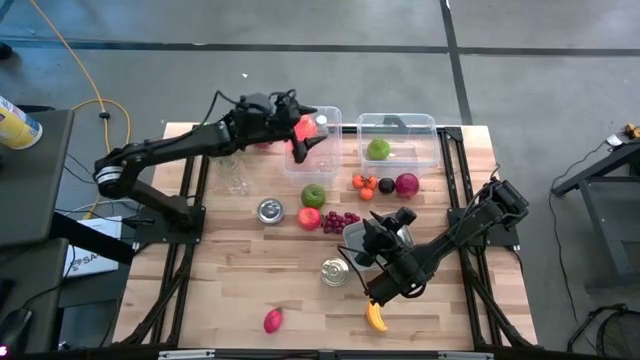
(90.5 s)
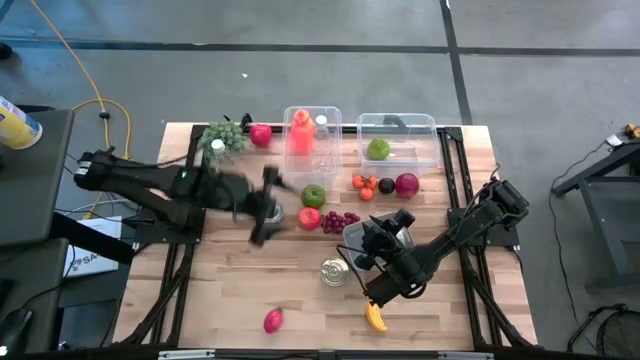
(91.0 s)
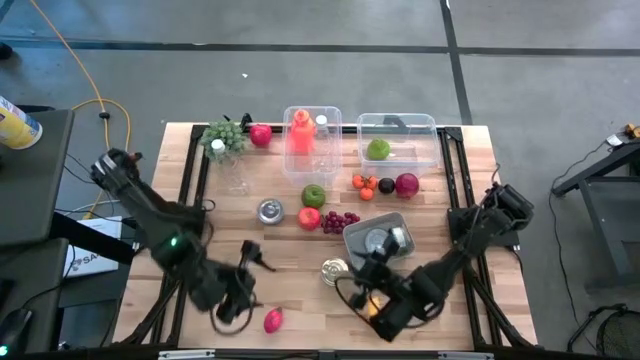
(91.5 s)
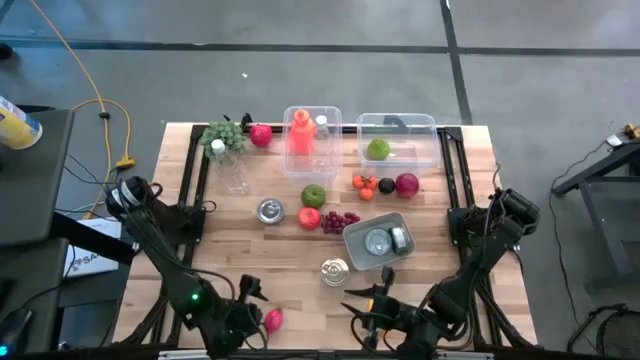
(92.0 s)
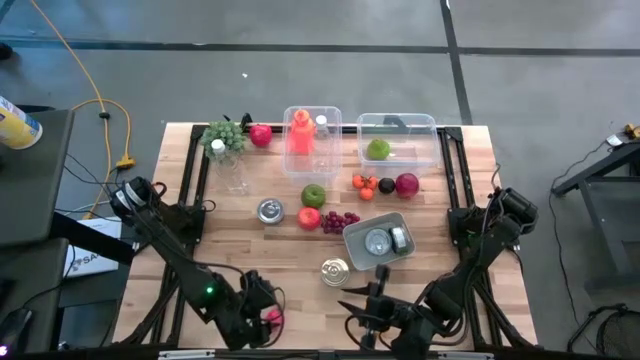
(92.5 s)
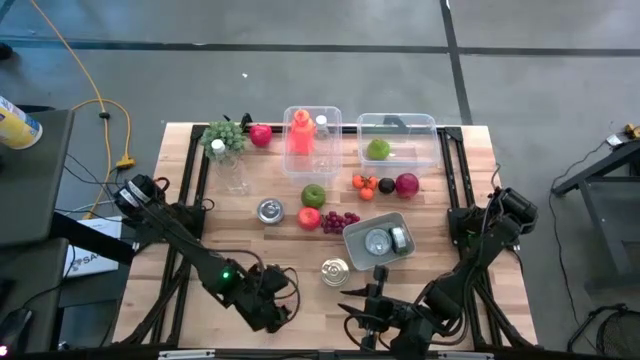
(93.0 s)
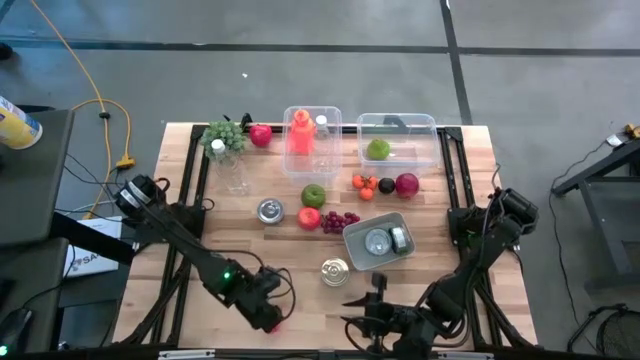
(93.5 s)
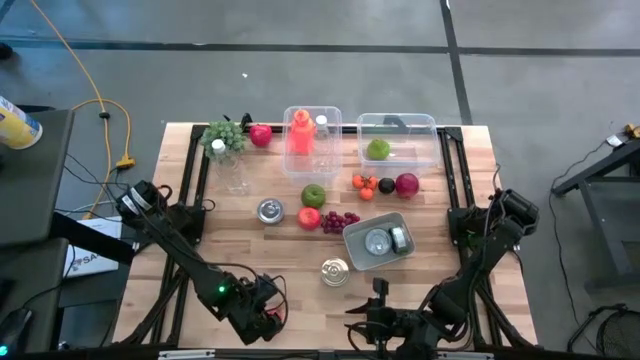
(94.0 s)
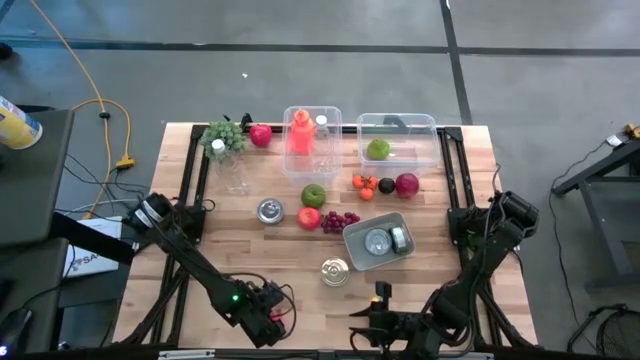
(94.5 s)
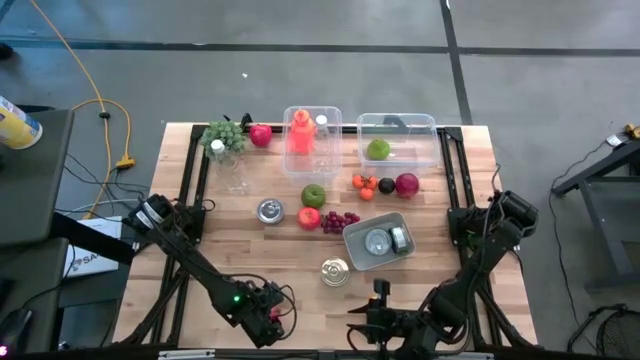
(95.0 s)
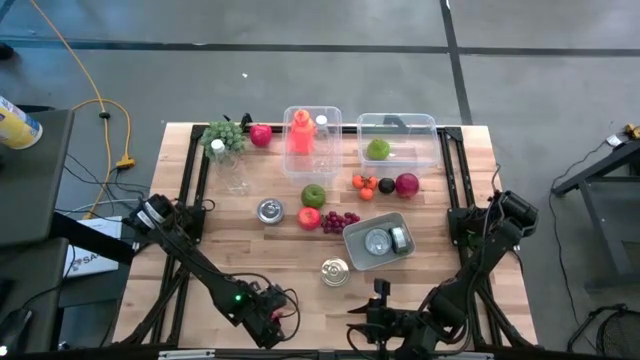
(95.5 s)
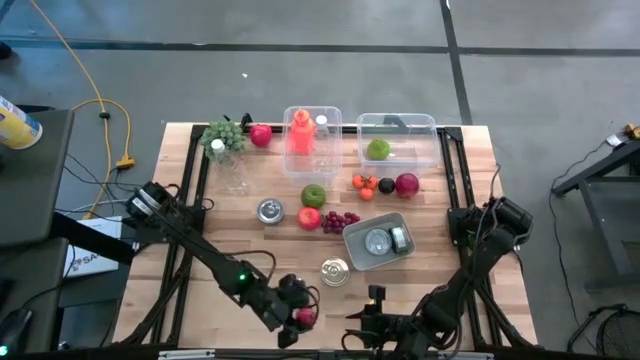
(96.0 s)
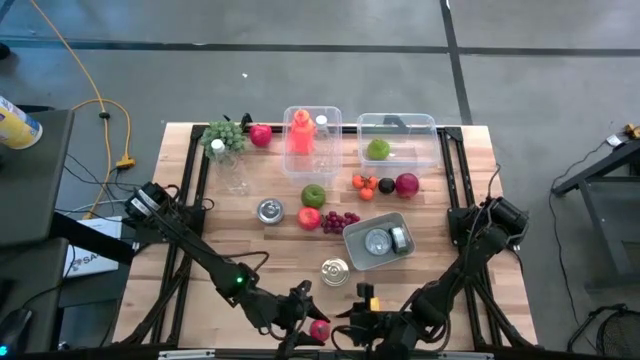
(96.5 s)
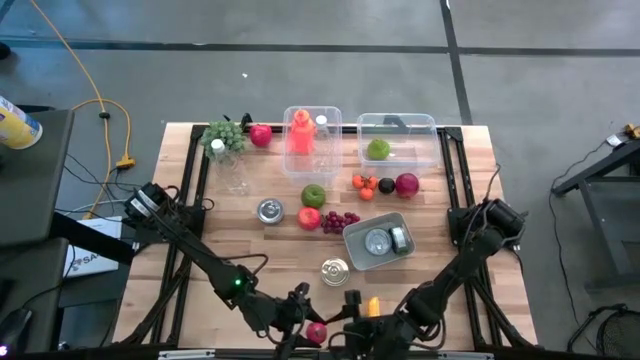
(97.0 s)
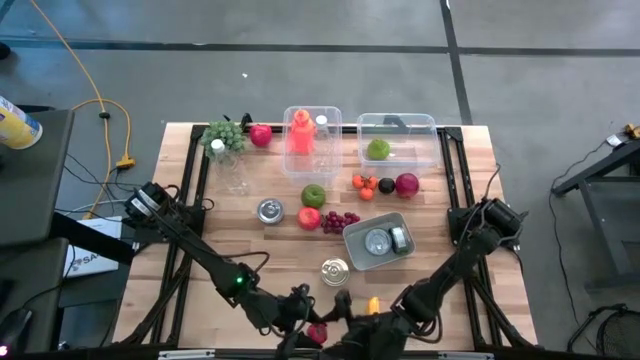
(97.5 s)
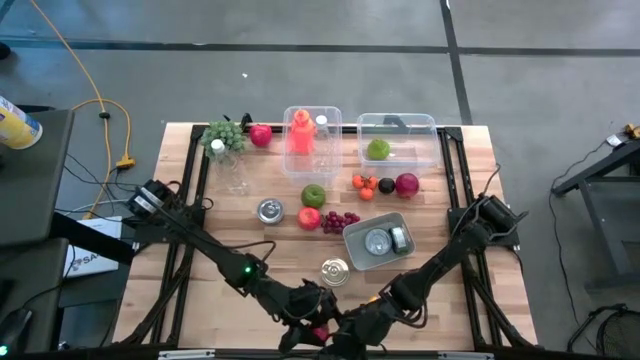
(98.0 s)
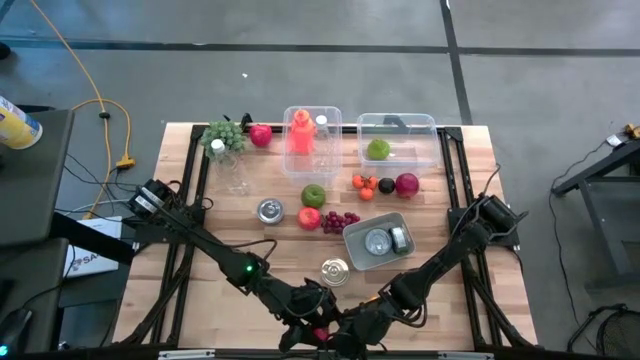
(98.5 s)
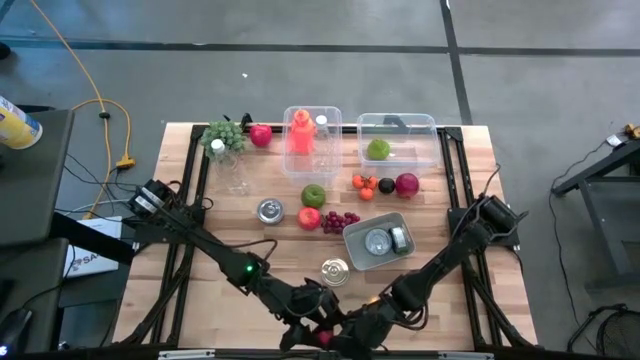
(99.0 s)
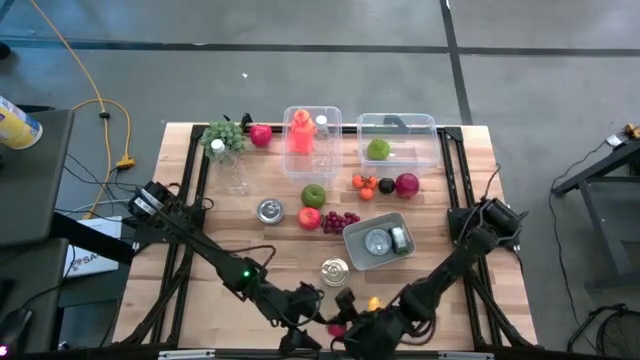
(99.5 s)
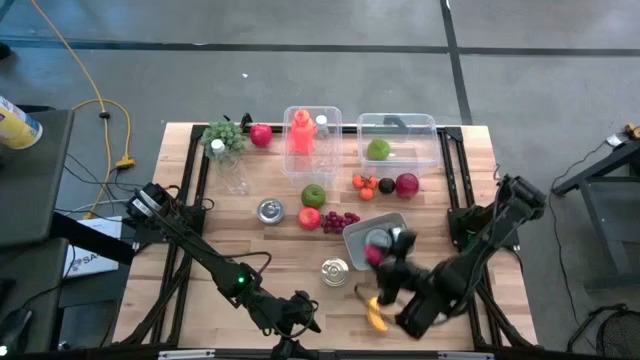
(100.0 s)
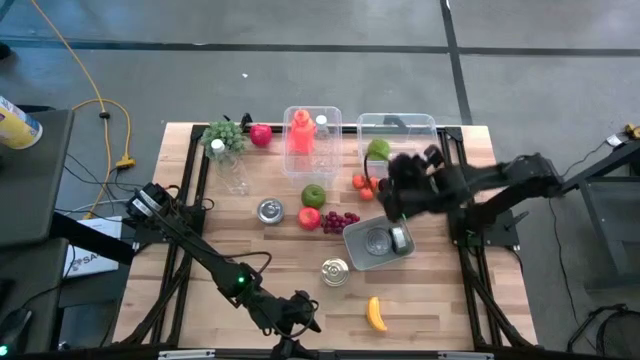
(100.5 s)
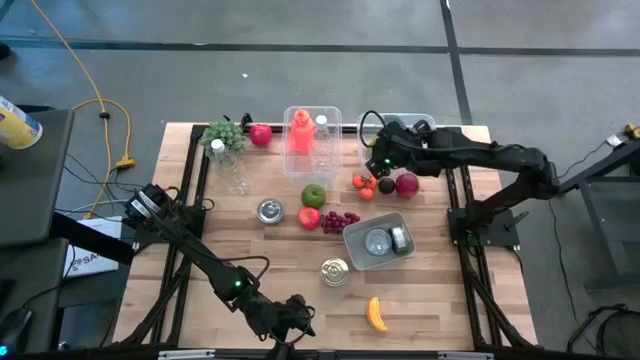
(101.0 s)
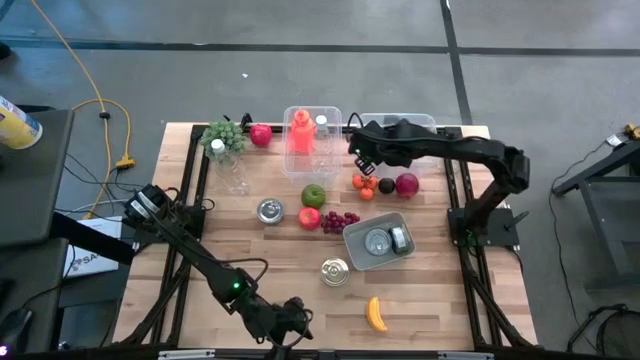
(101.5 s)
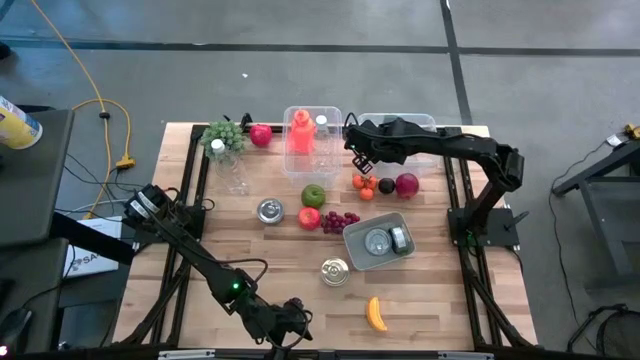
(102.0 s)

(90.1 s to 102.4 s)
Task: Pick & Place Food Item
Put the dragon fruit into the right transparent bin

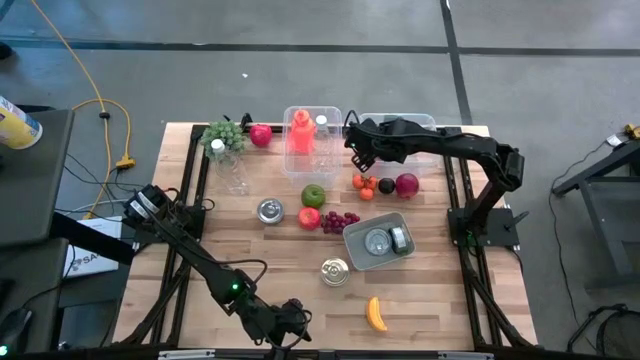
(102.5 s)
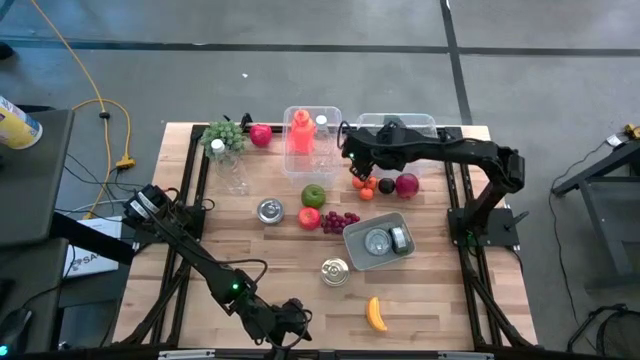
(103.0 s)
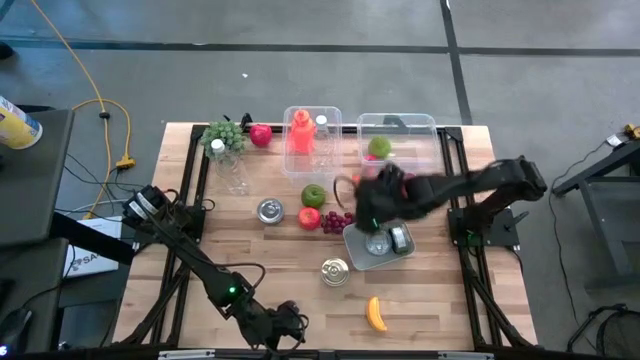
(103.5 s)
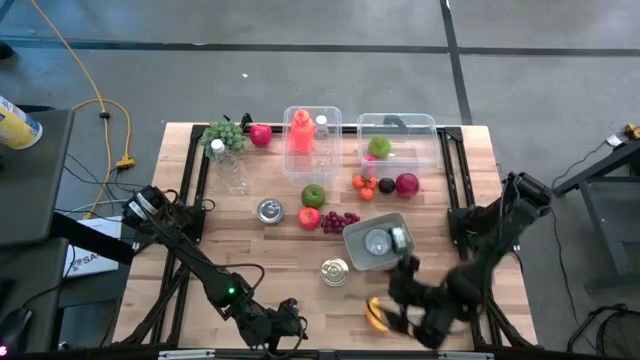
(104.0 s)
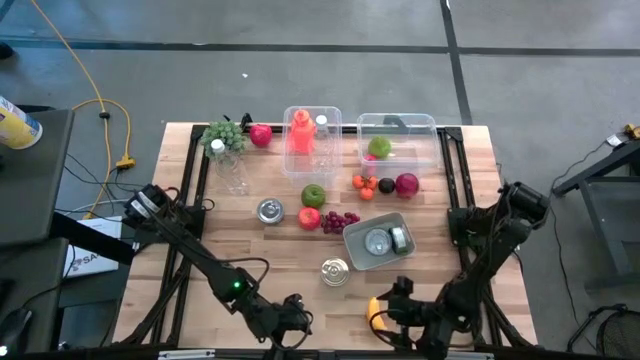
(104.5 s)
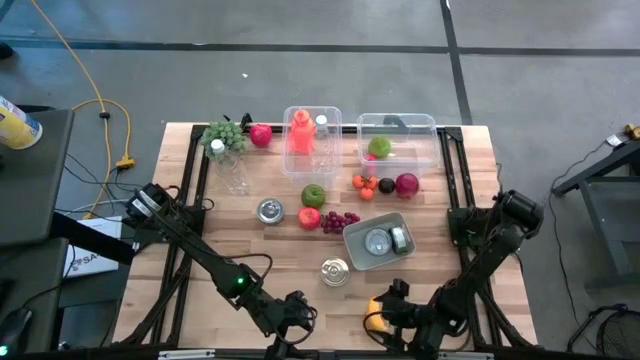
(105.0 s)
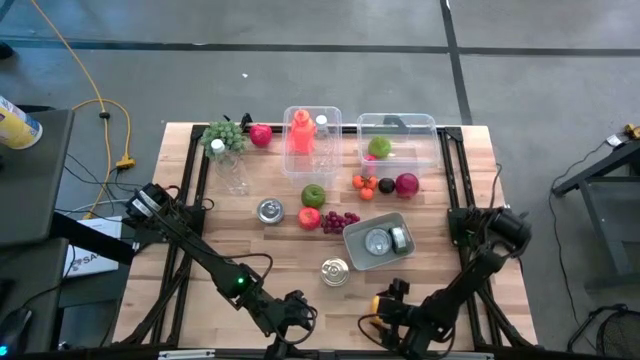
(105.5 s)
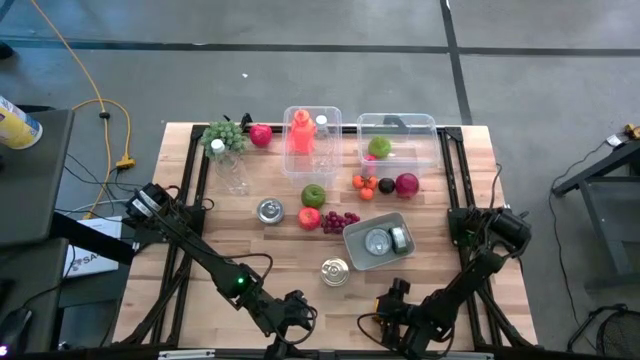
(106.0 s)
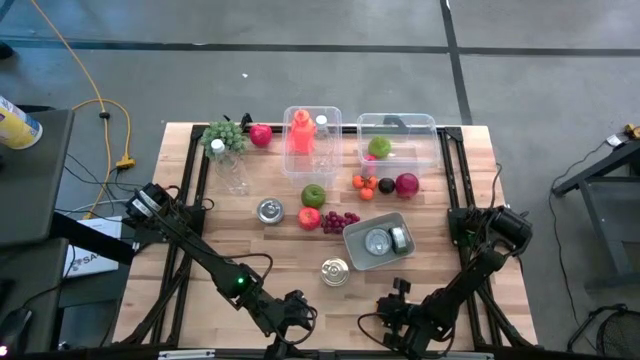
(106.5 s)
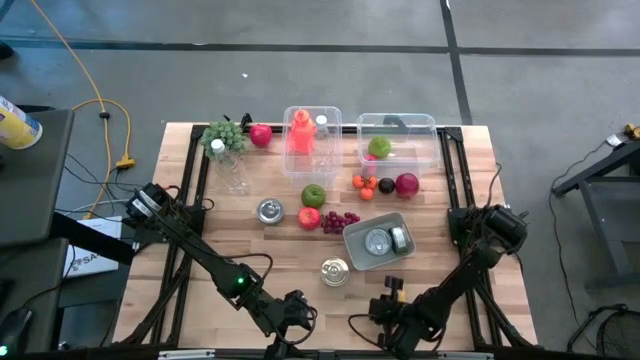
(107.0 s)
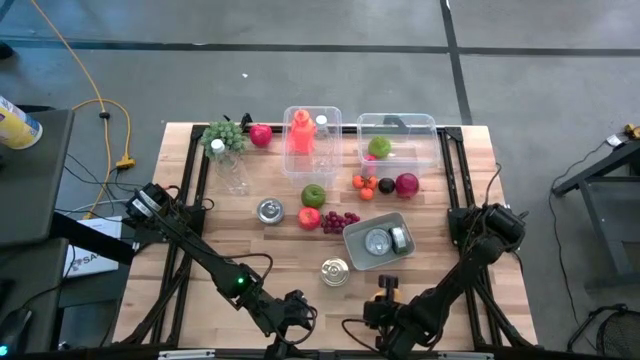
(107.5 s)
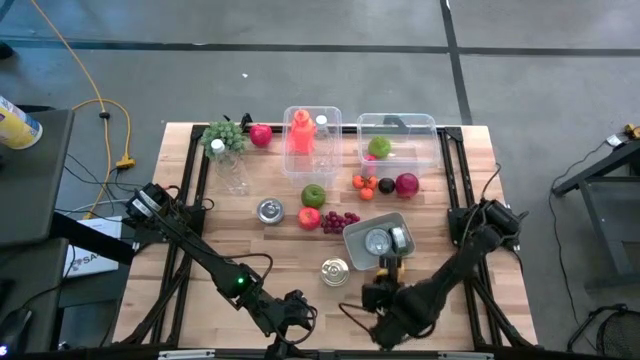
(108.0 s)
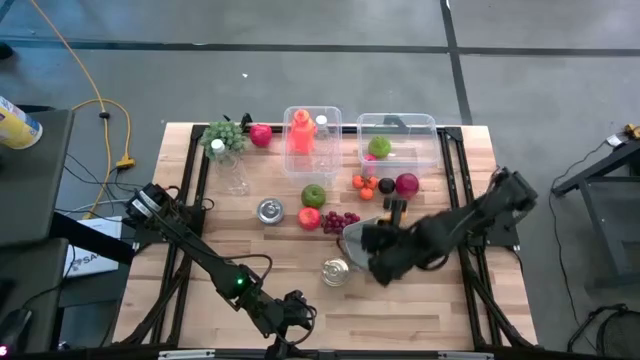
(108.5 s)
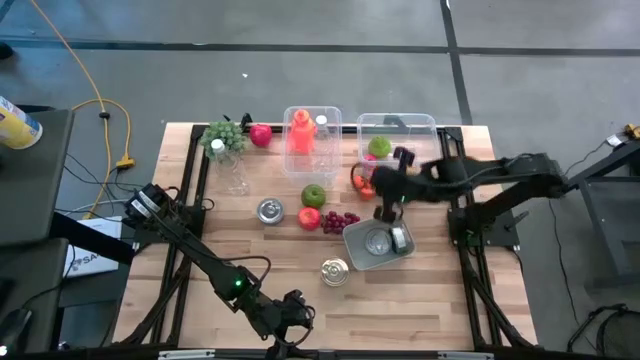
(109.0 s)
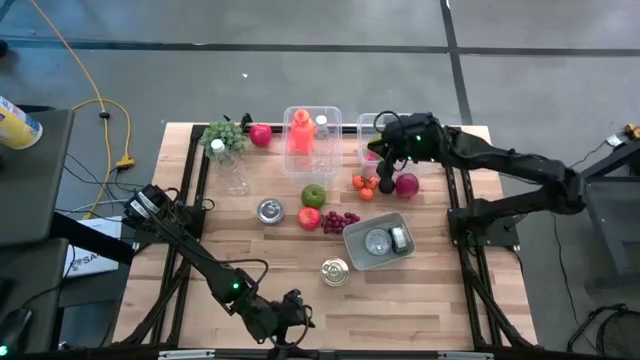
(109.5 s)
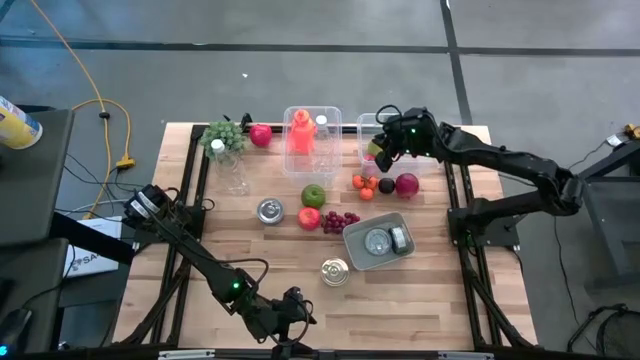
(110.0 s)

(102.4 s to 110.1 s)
Put the banana into the right transparent bin

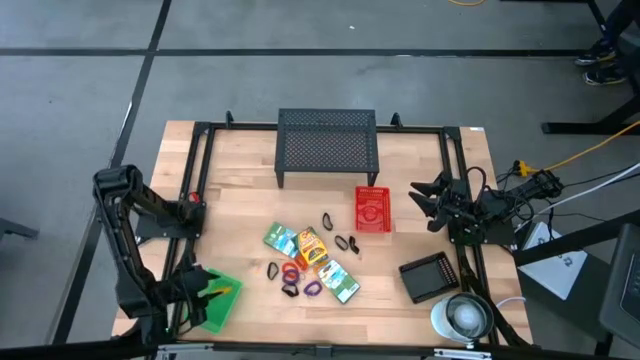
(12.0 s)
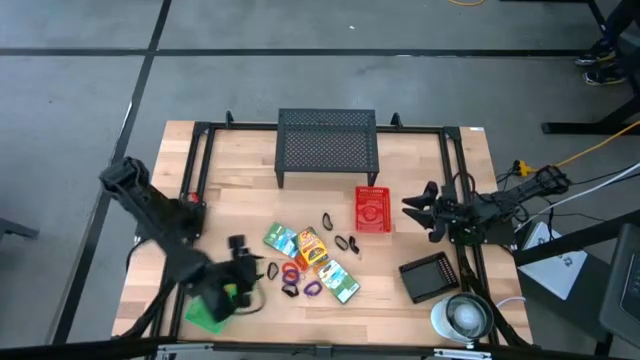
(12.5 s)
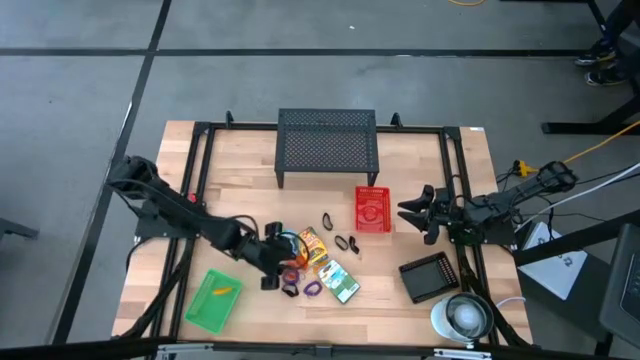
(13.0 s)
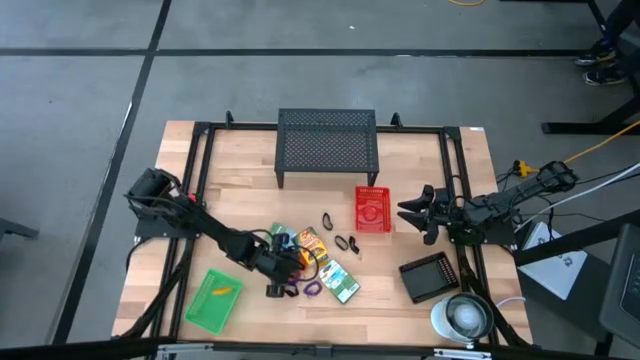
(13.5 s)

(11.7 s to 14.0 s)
Task: Pick & Place Office Desk Supplies
Put the violet spring keychain into the green bin
